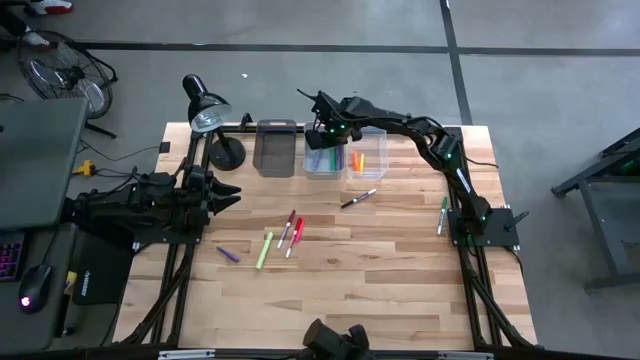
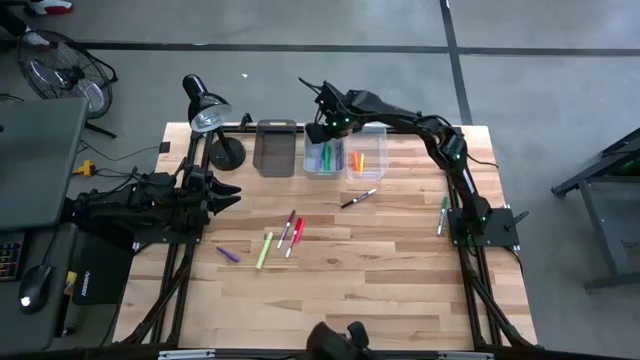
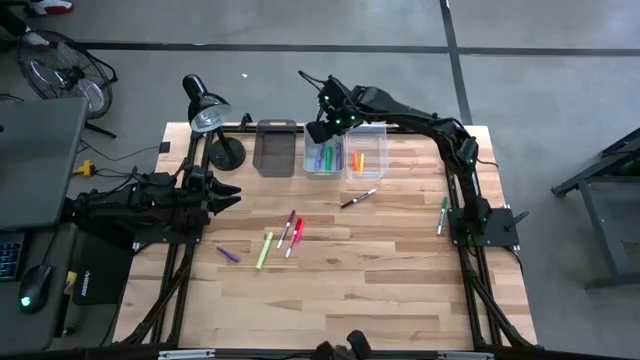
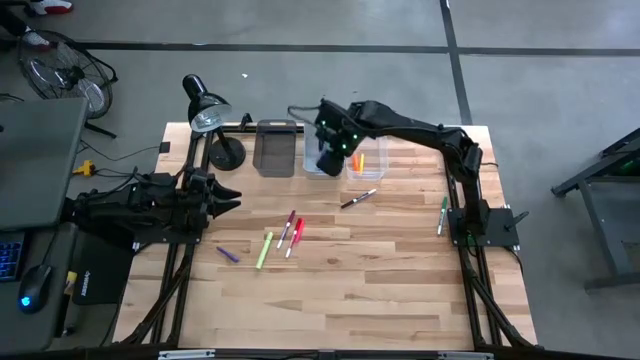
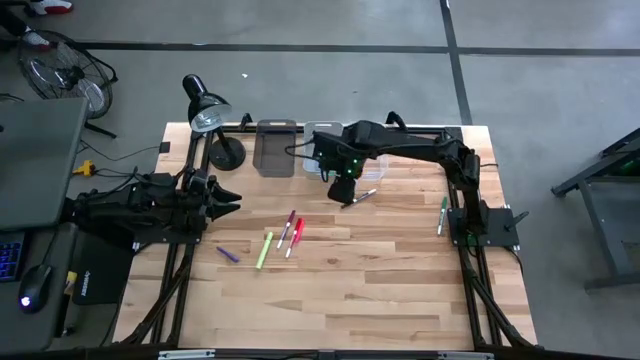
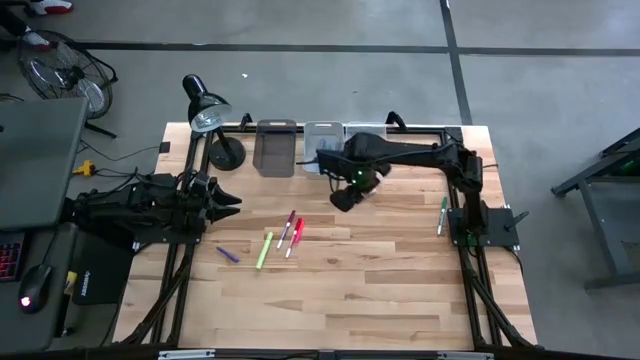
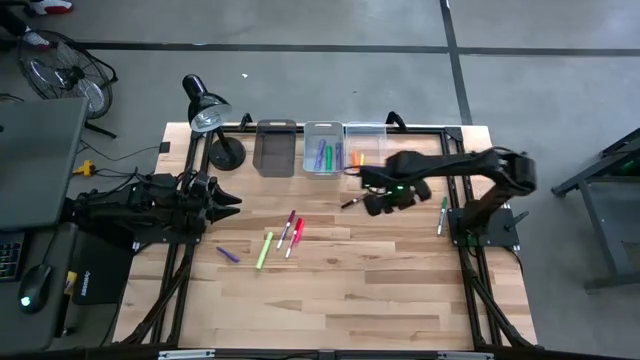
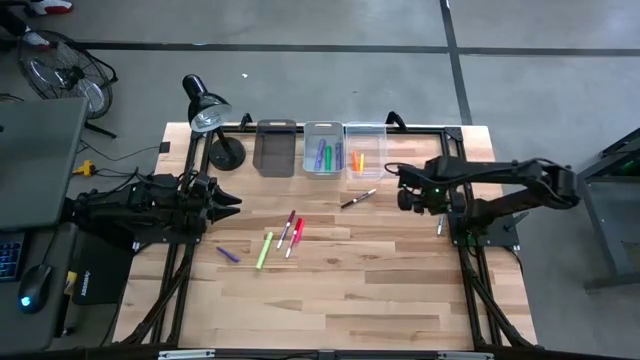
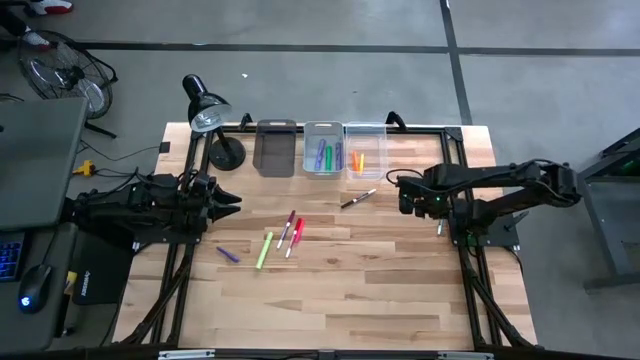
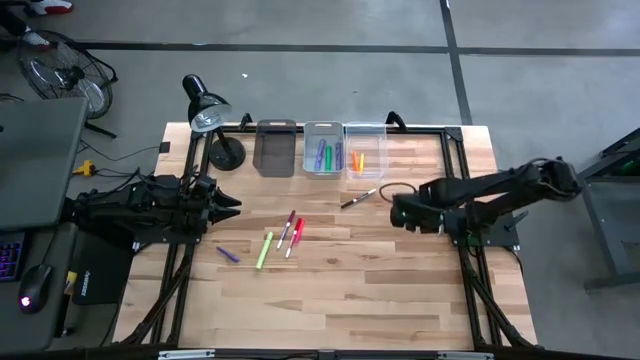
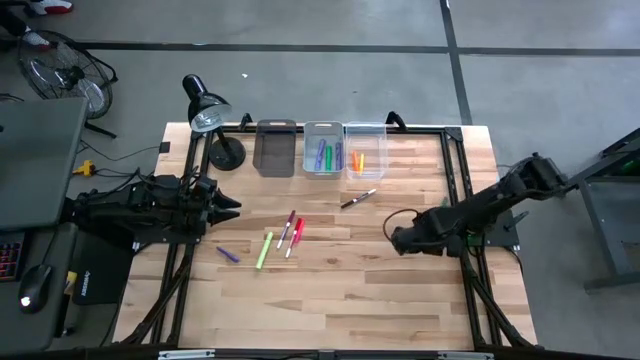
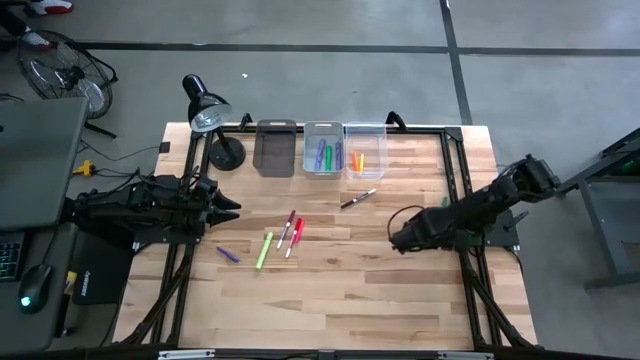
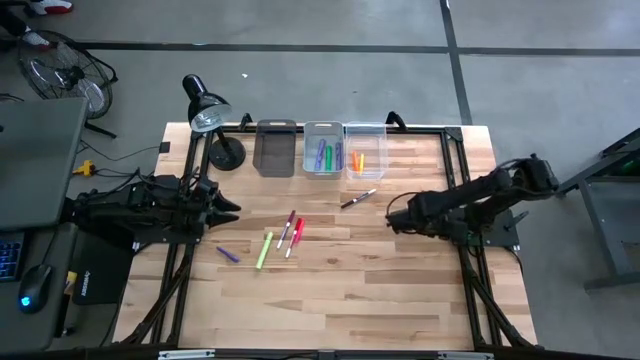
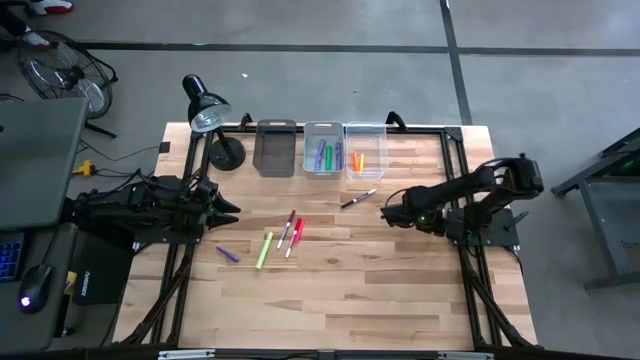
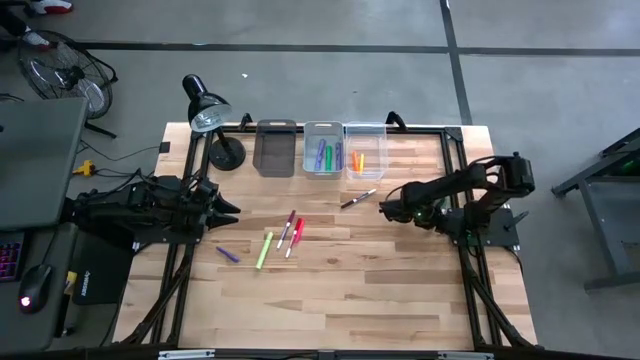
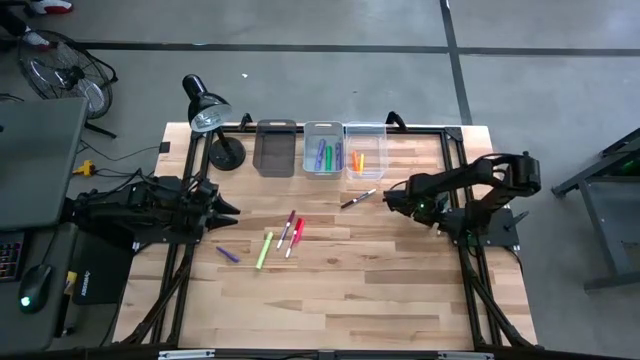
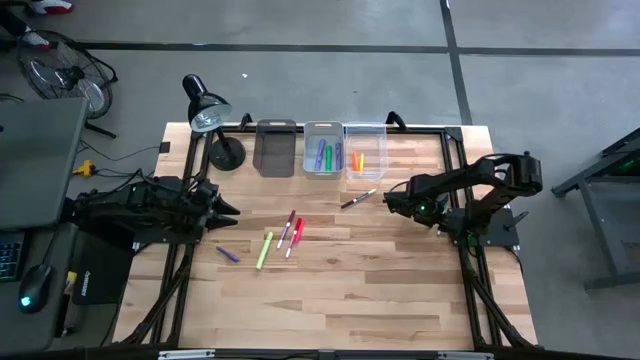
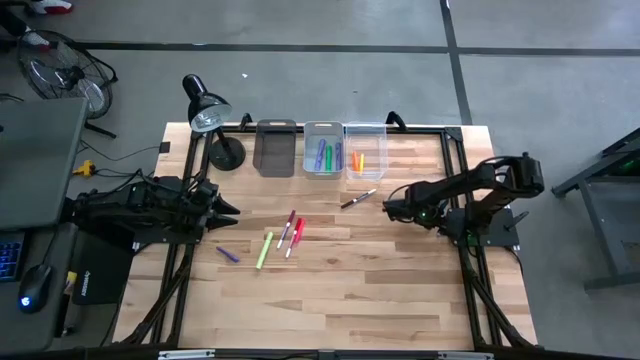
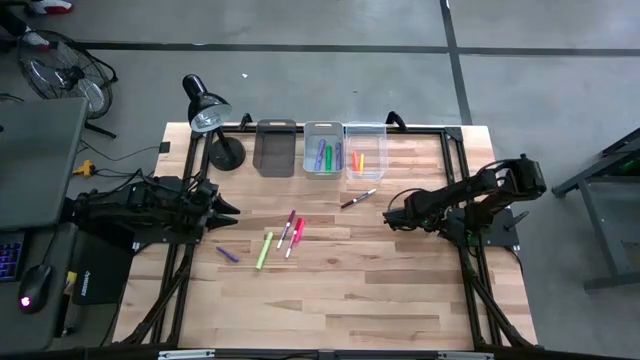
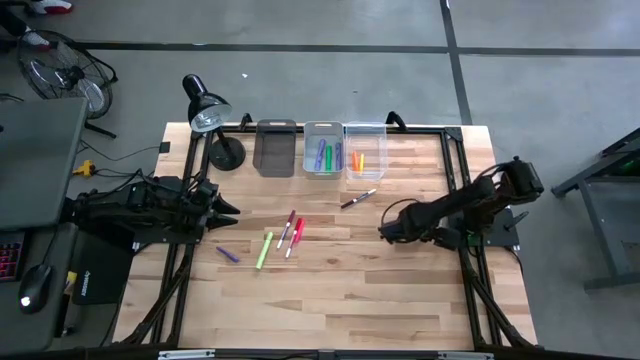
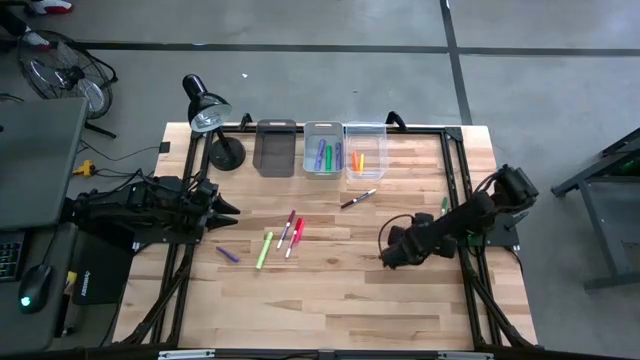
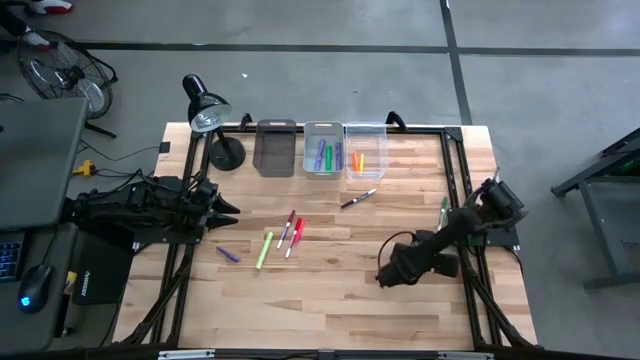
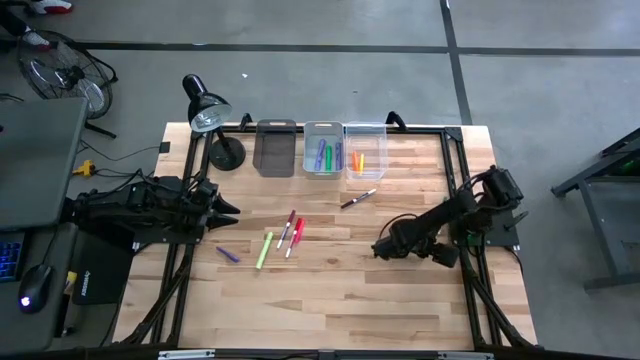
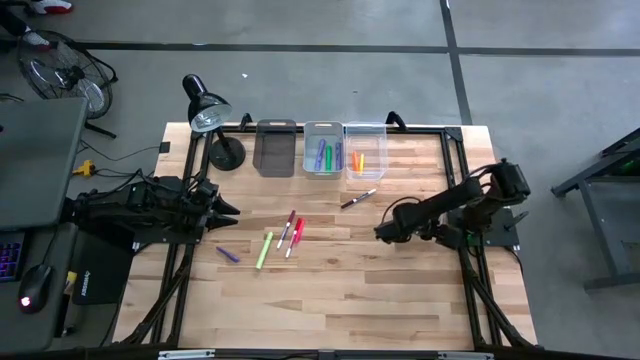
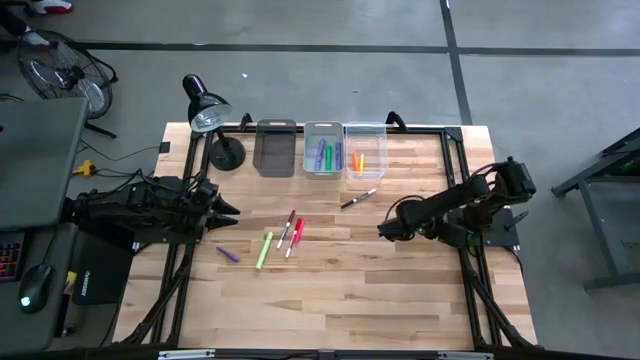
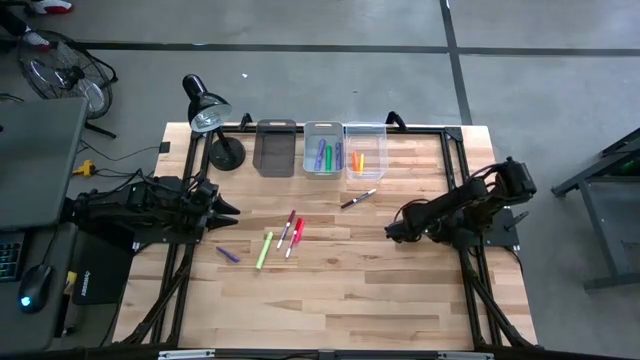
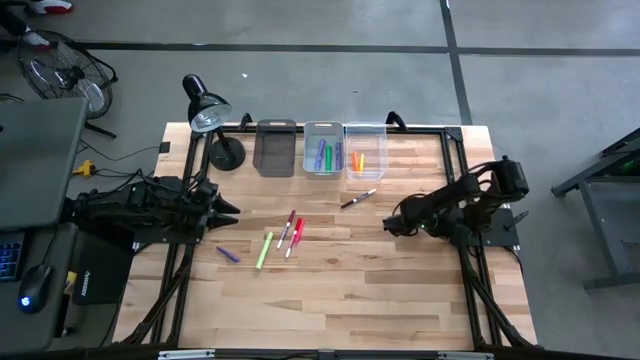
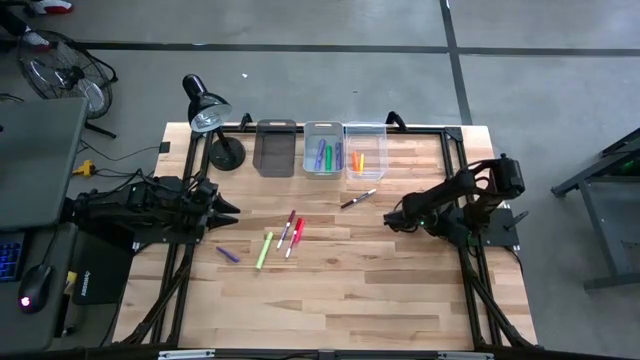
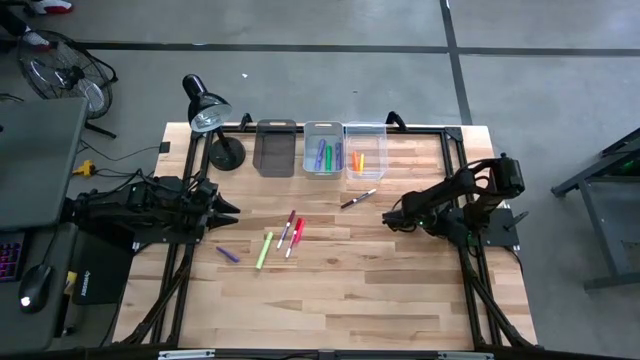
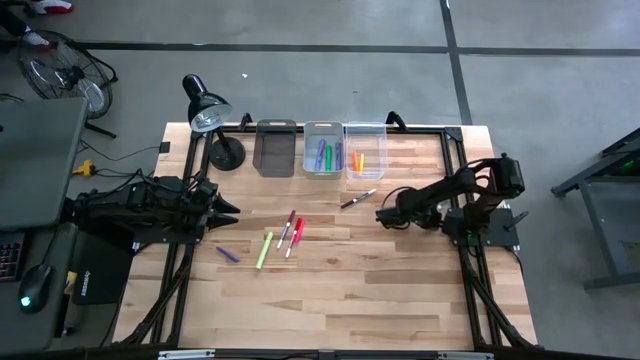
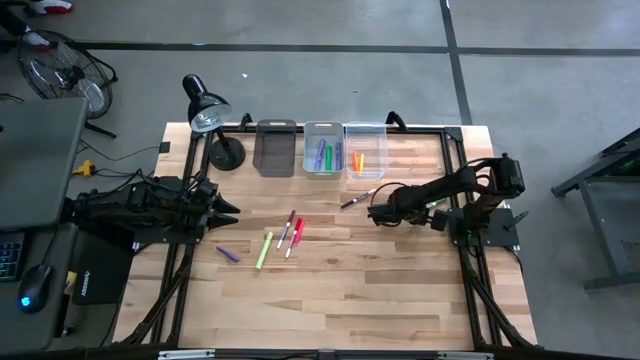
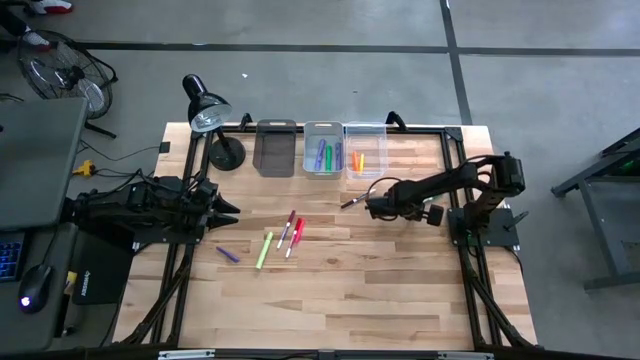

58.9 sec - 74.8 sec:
Task: Pick & Place Markers
Put the green marker into the black bin

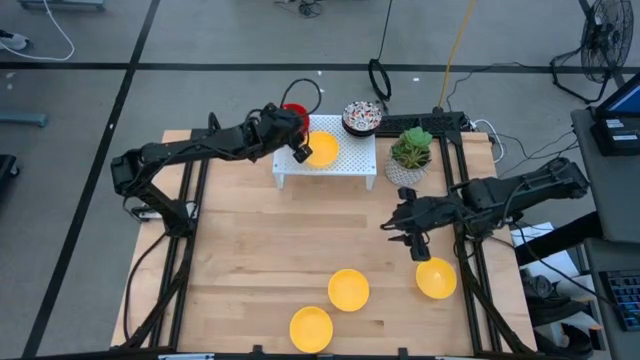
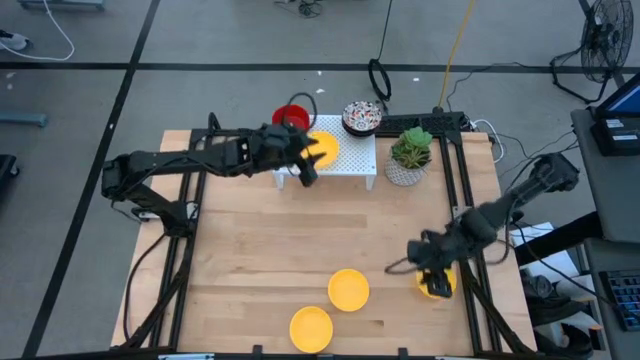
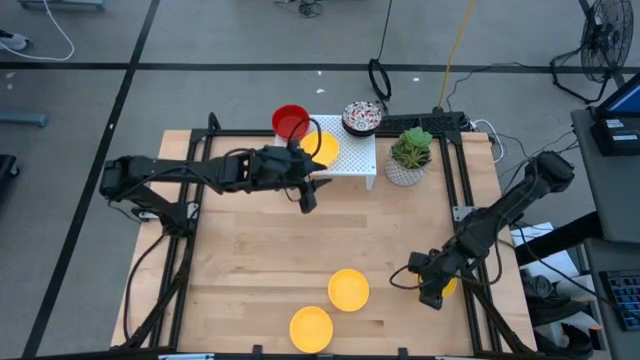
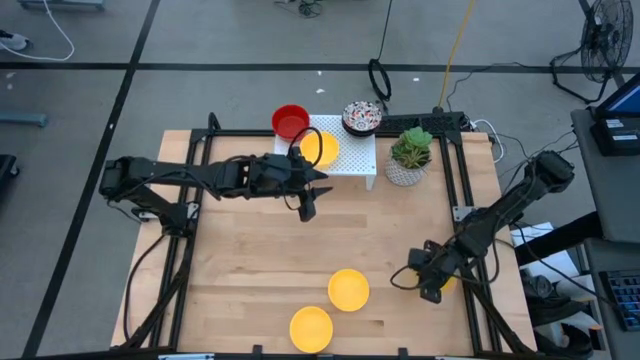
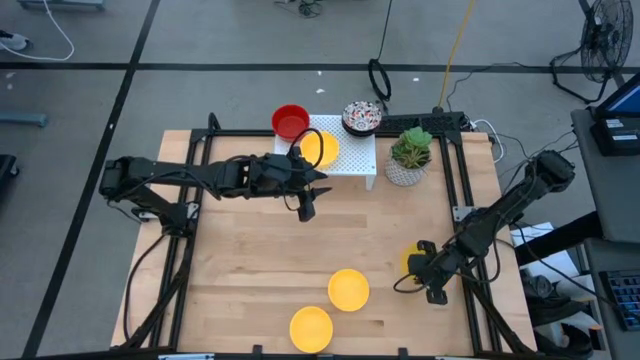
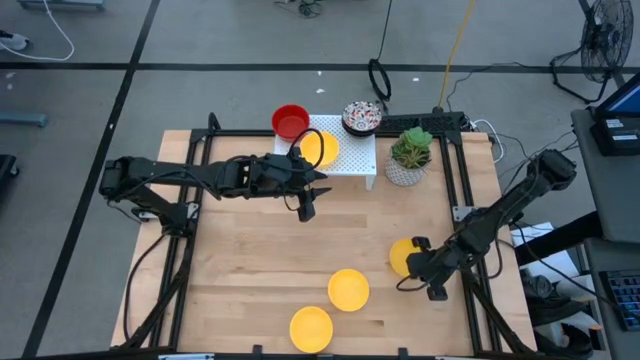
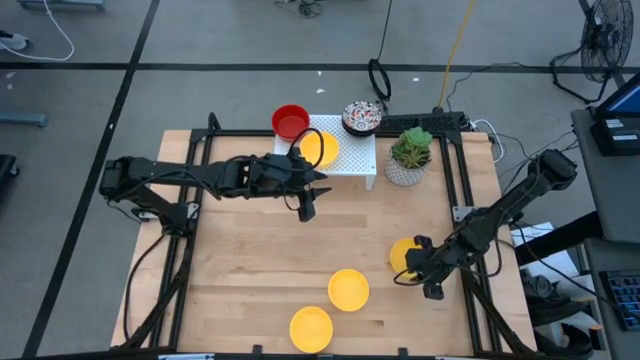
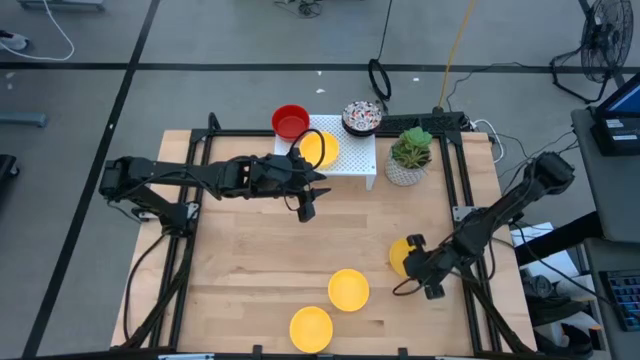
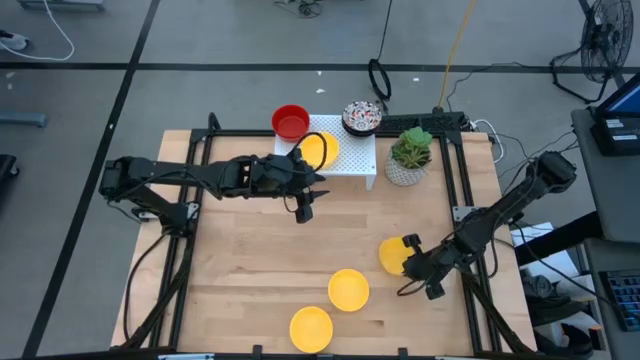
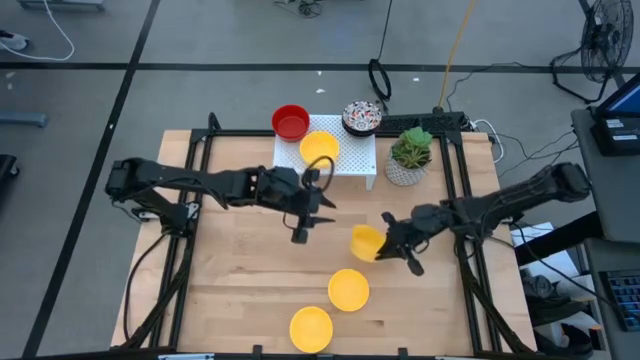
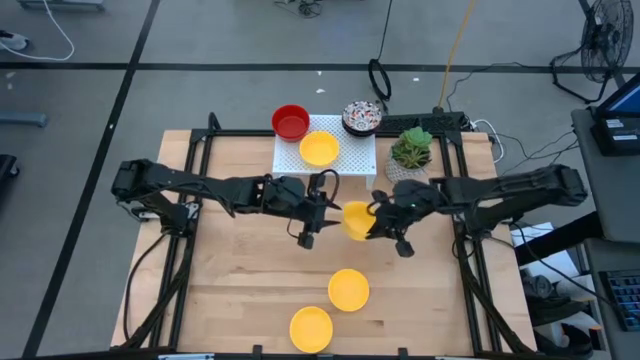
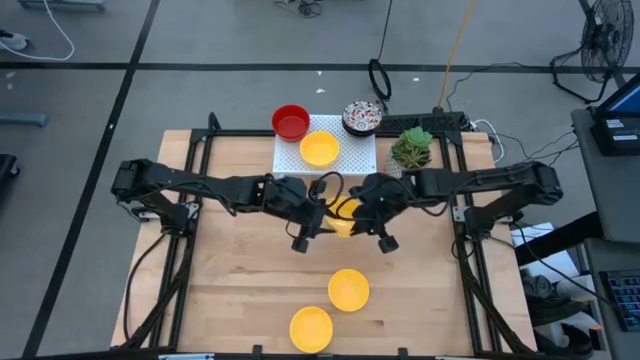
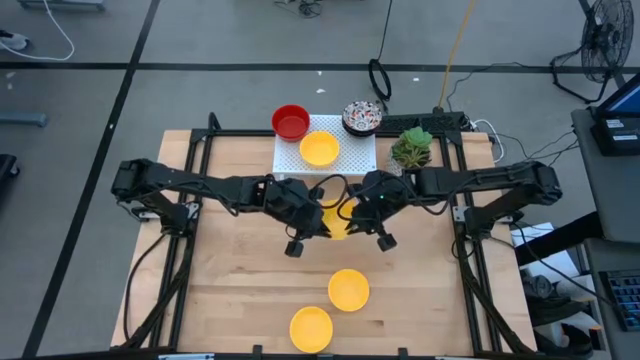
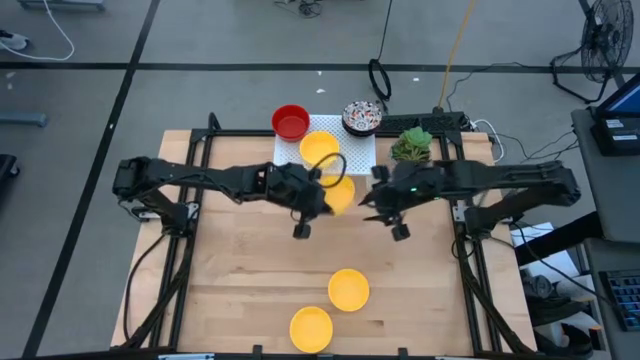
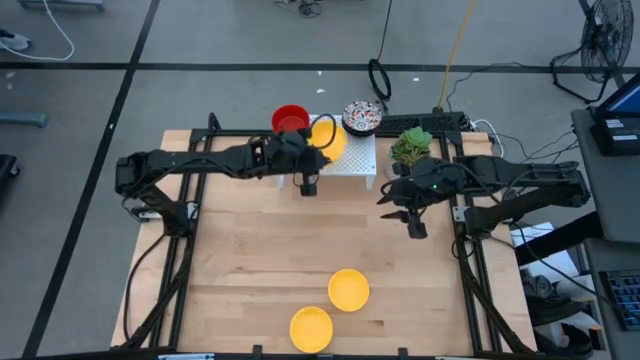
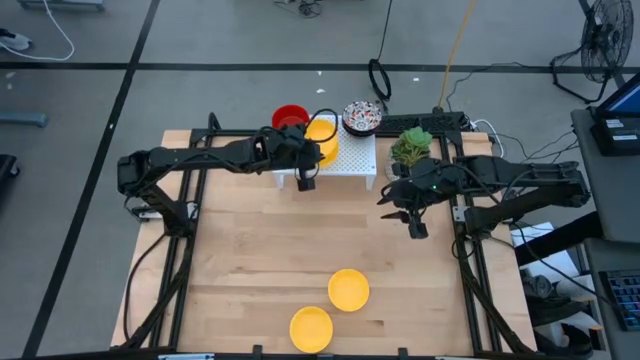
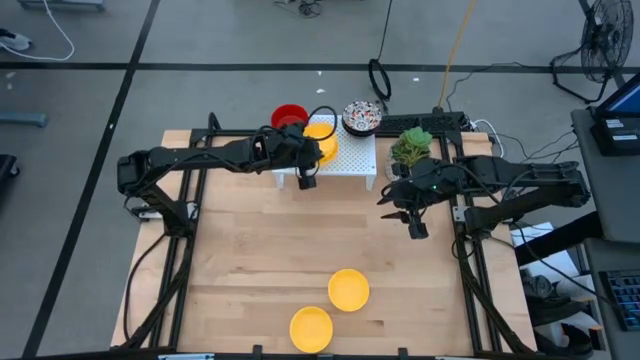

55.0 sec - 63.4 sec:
Task: Pick & Place Mini bowls
Stack the yellow bowl on the other yellow bowl on the shelf
